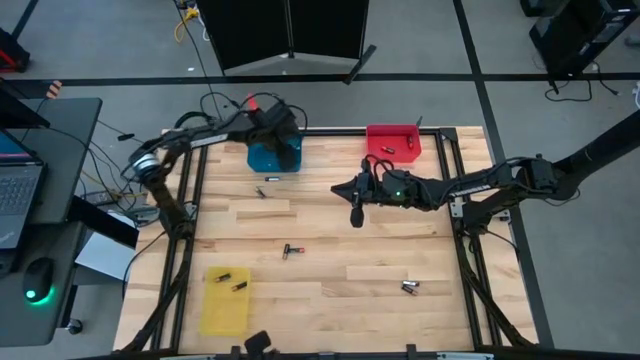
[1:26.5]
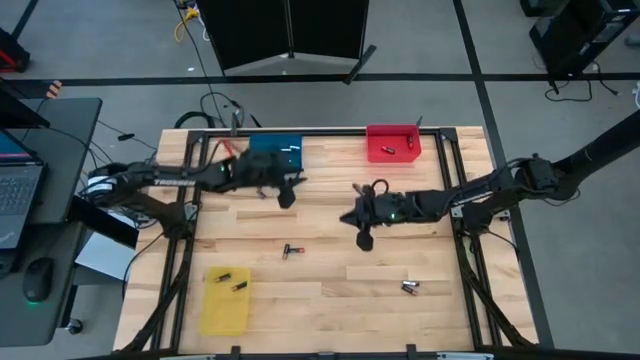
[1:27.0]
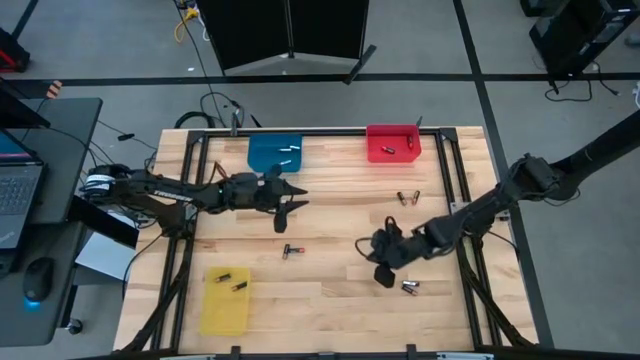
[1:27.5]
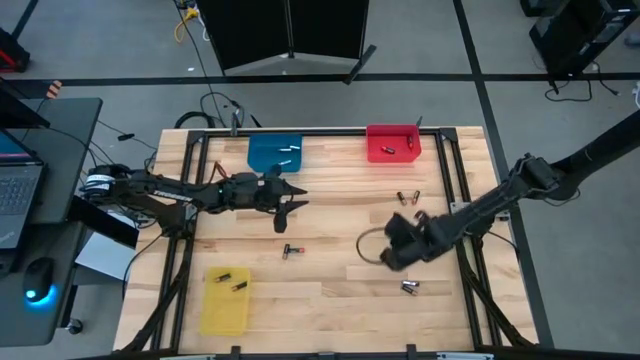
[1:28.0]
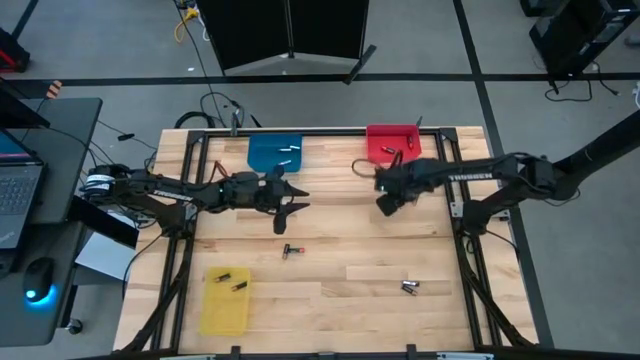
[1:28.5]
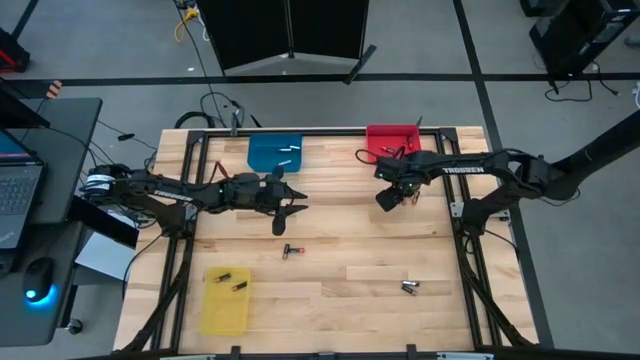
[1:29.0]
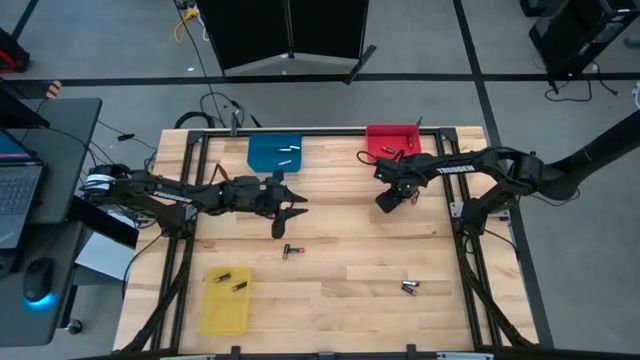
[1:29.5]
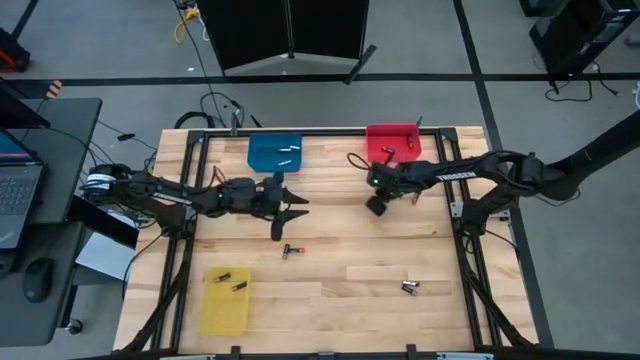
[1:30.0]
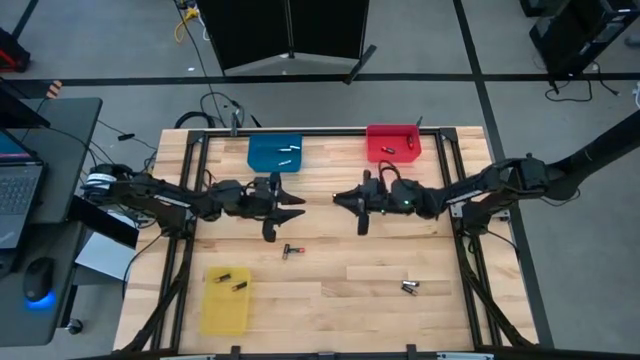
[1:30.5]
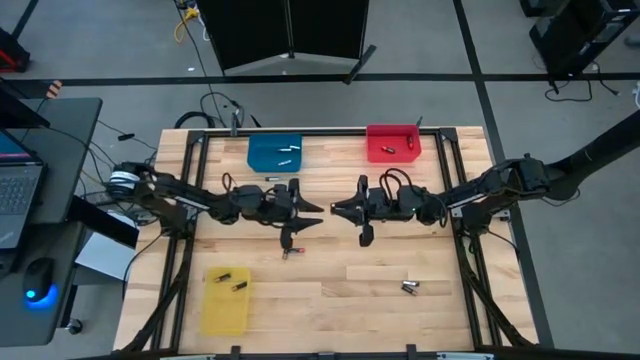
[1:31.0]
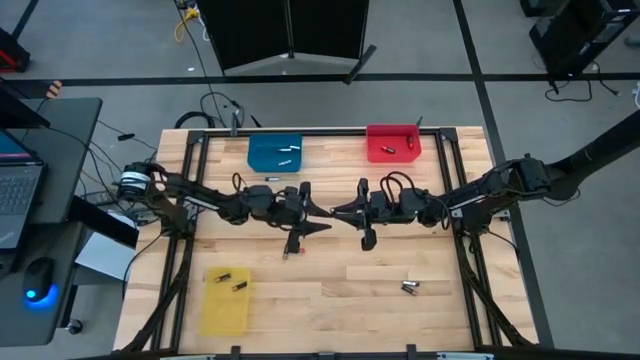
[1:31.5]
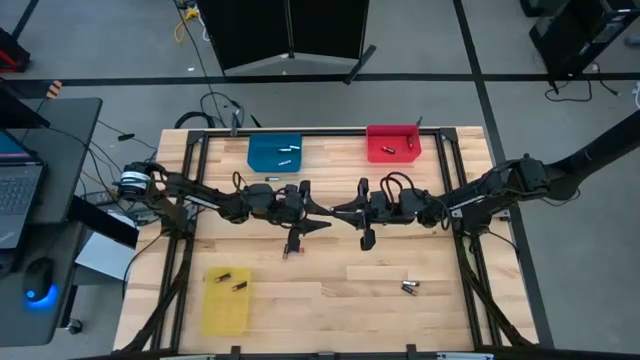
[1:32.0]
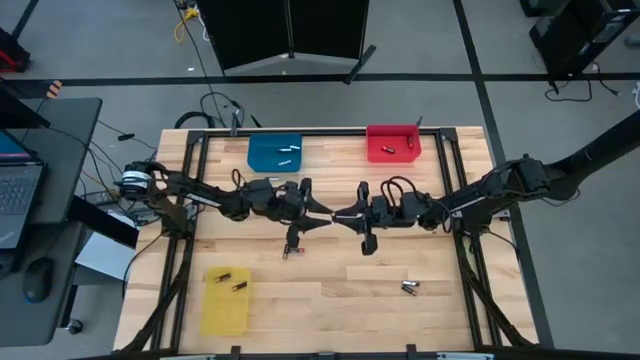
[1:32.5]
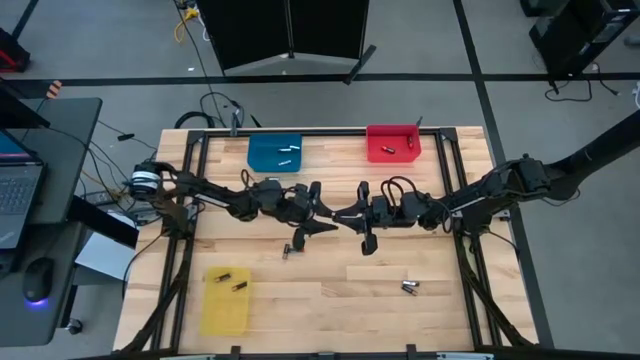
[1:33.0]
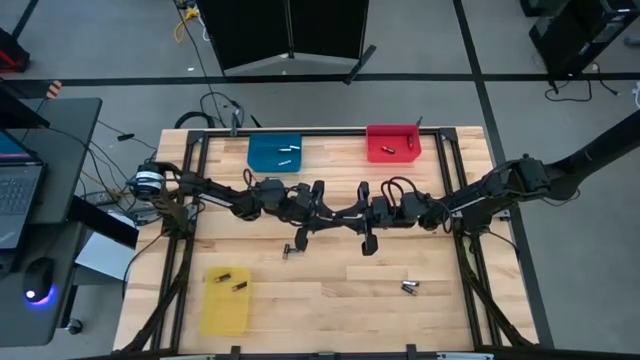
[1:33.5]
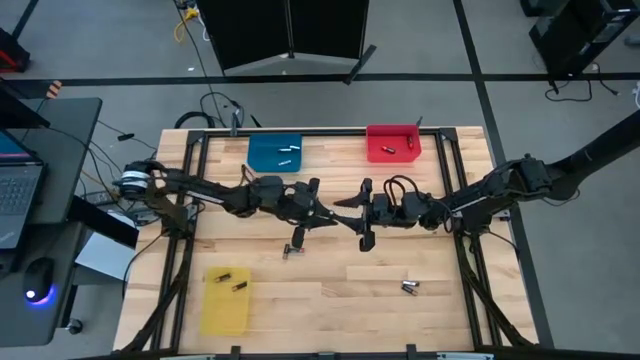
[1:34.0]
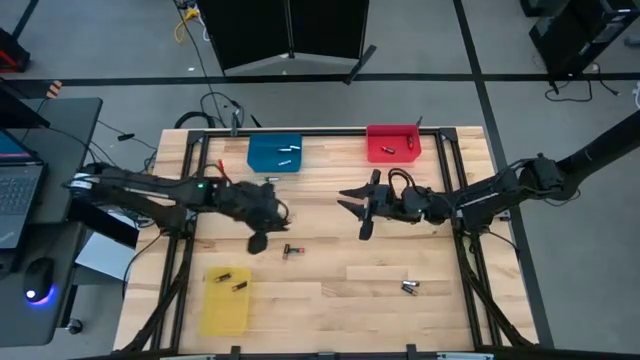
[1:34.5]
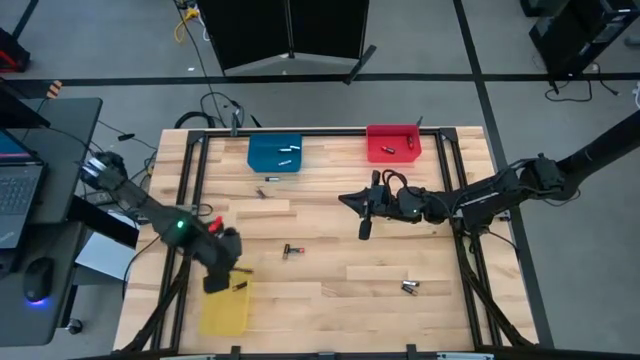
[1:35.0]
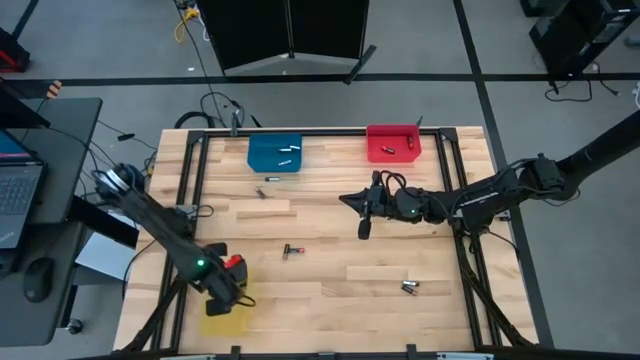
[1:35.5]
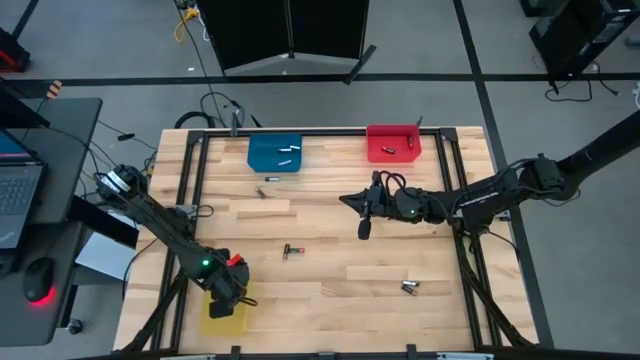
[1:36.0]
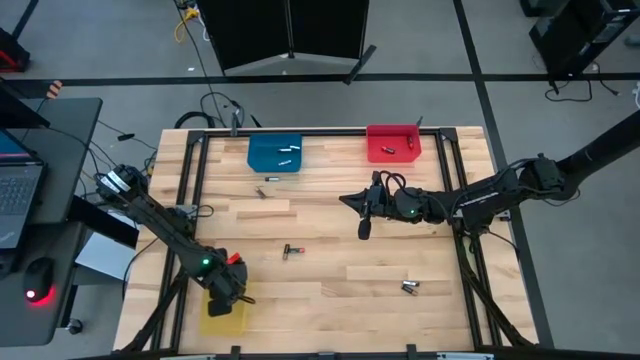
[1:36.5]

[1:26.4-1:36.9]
Task: Sort batteries
Put the black-brown battery into the yellow bin

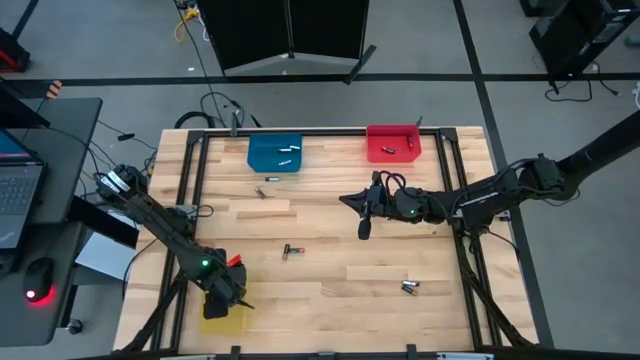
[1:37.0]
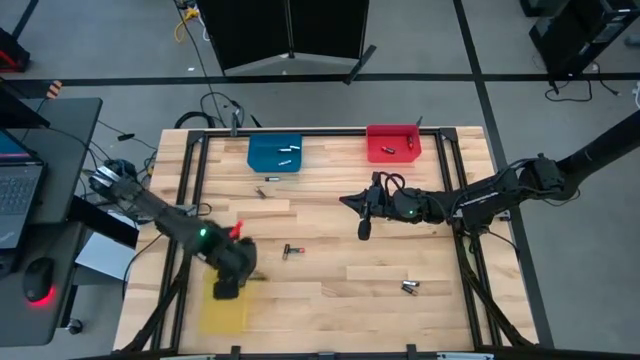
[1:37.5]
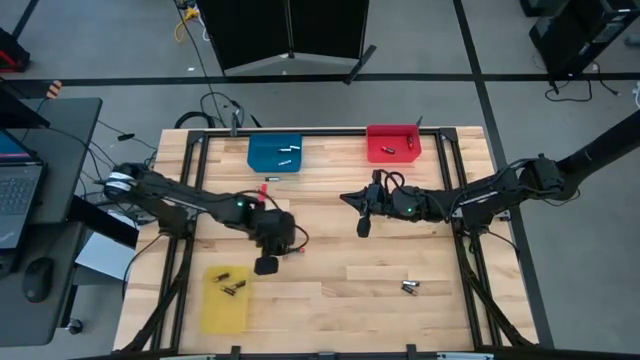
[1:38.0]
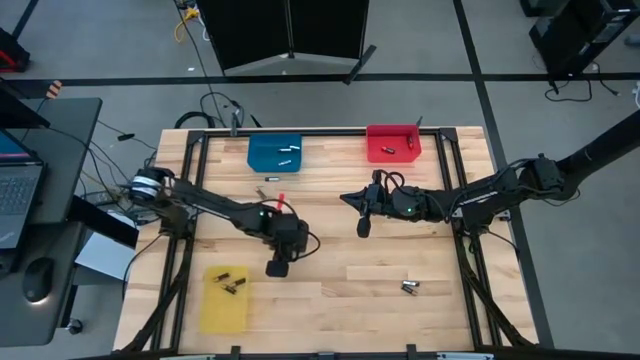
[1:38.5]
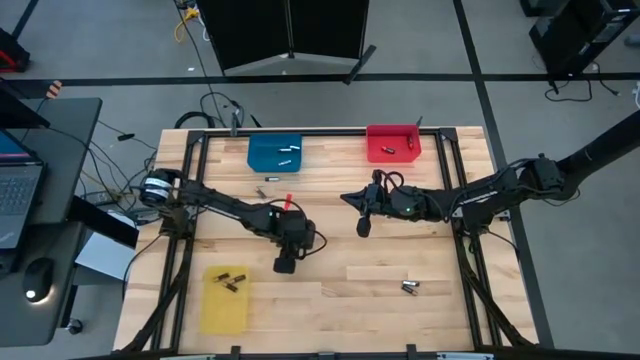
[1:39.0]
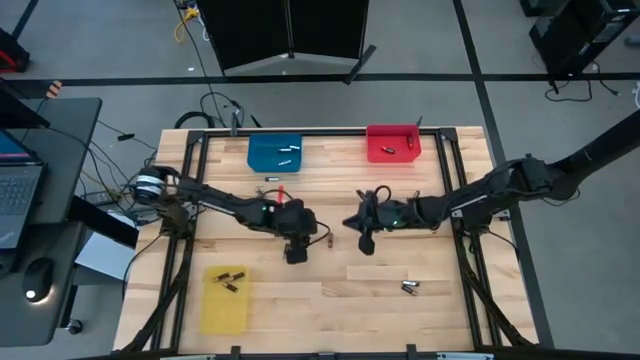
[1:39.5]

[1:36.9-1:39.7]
Put the black-red battery into the red bin

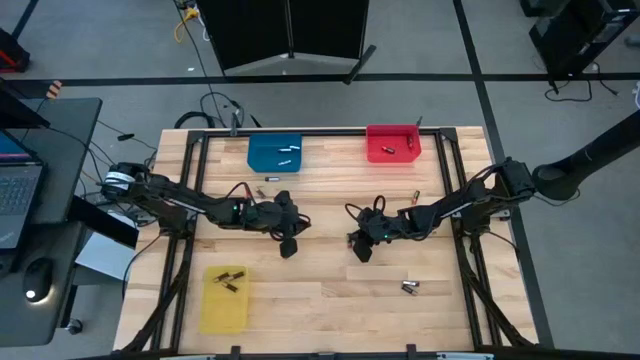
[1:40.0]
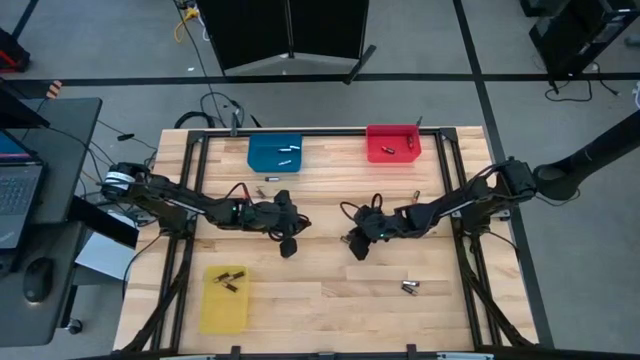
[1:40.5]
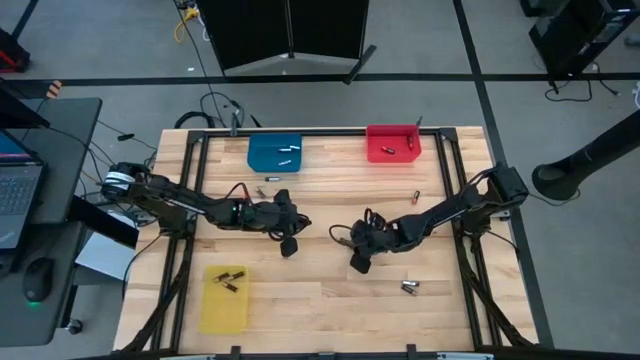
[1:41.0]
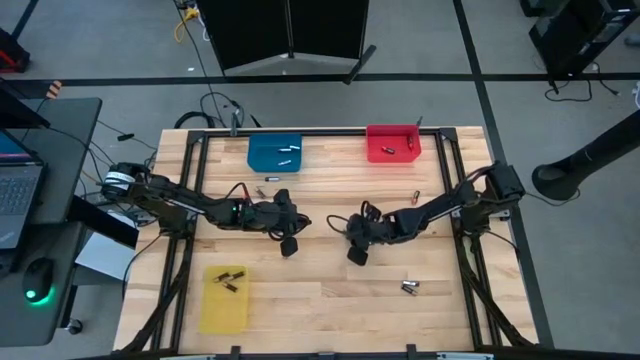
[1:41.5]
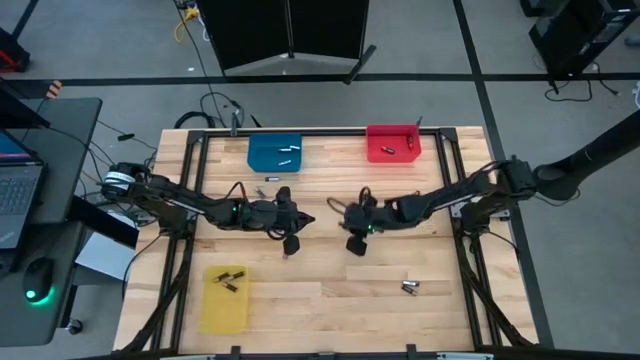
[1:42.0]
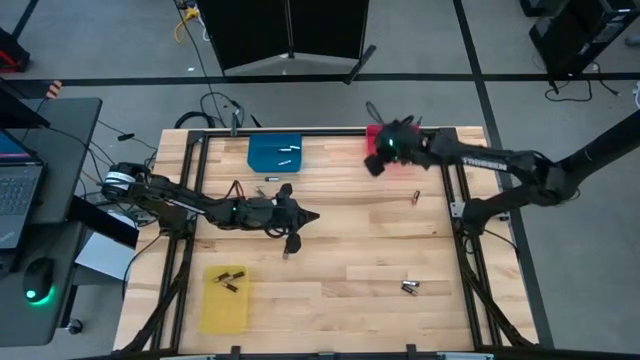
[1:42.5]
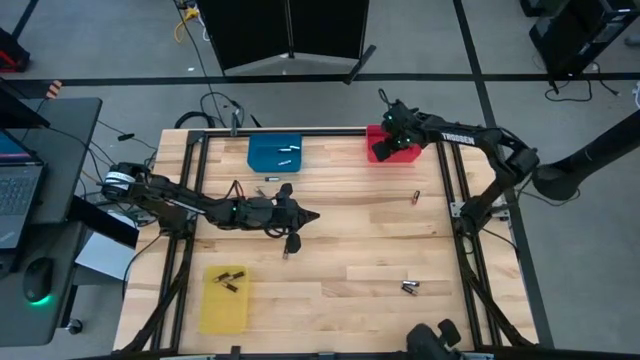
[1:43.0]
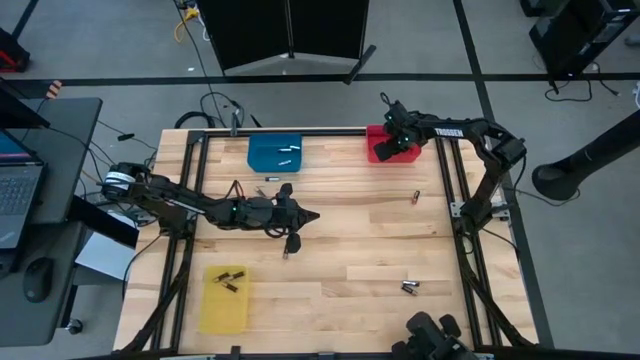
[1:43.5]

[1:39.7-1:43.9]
Put the black-red battery into the red bin

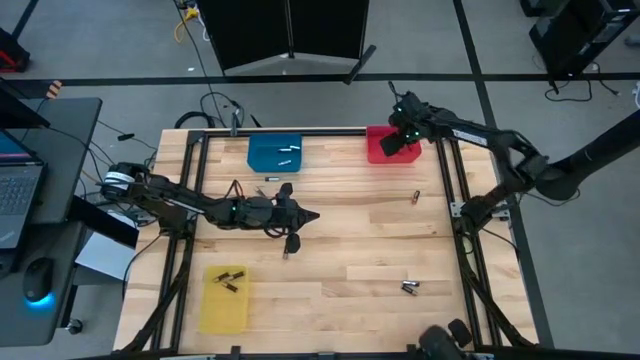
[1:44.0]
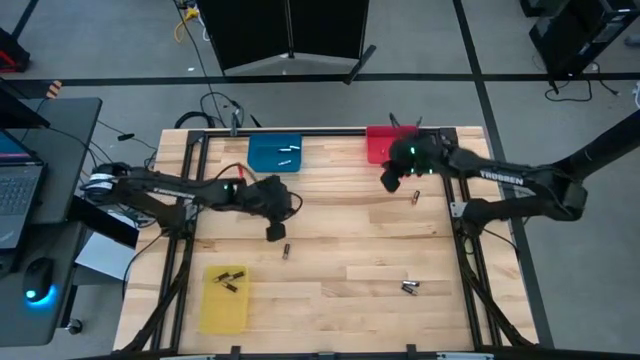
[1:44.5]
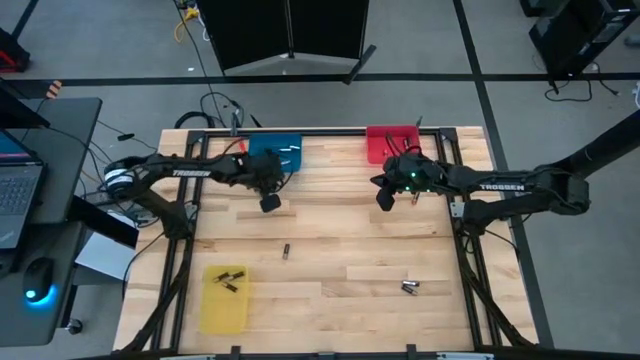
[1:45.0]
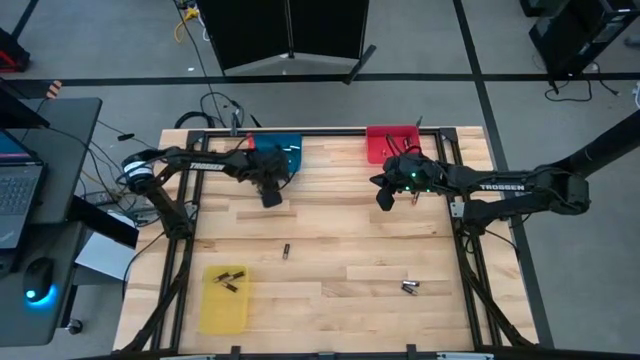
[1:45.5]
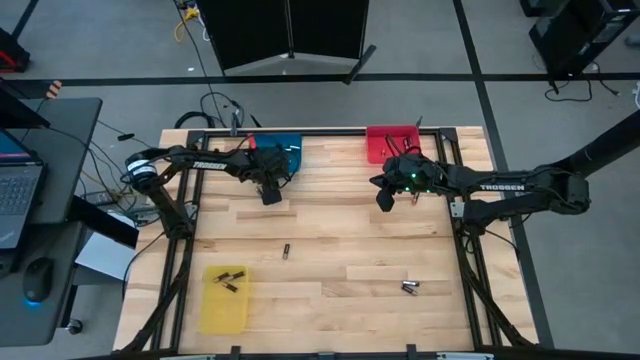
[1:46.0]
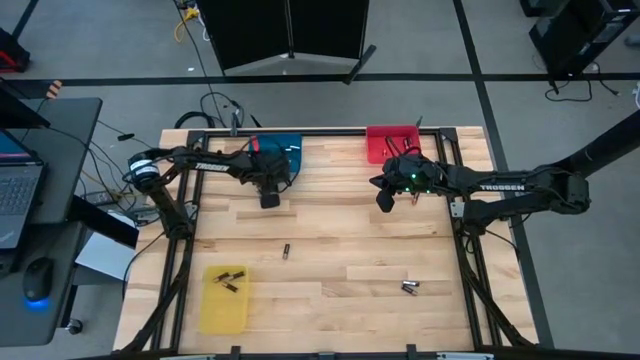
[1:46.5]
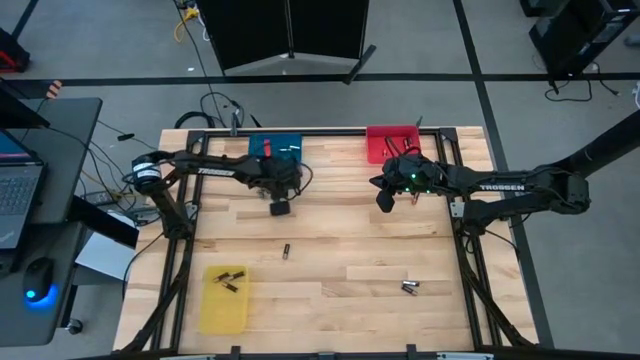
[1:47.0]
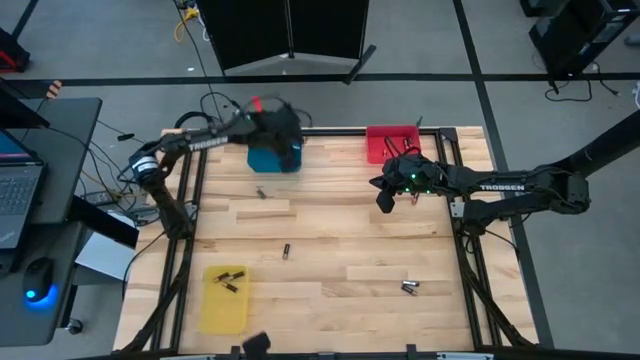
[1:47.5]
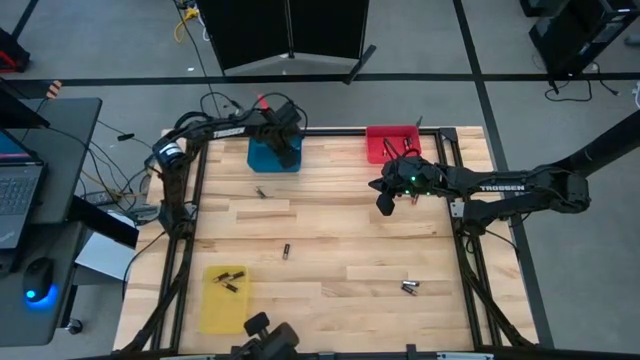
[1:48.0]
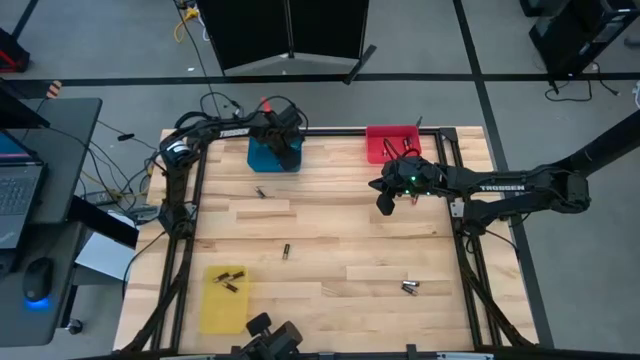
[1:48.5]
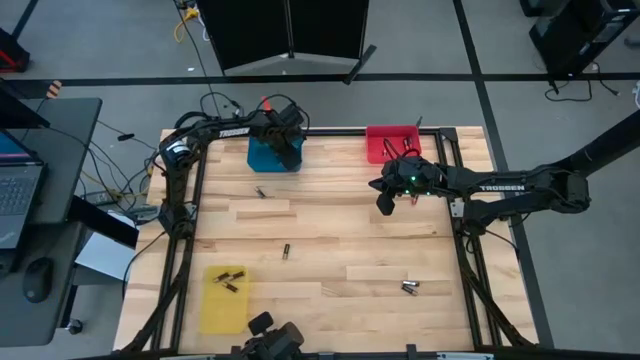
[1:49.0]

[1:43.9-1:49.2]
Put the silver battery into the blue bin
